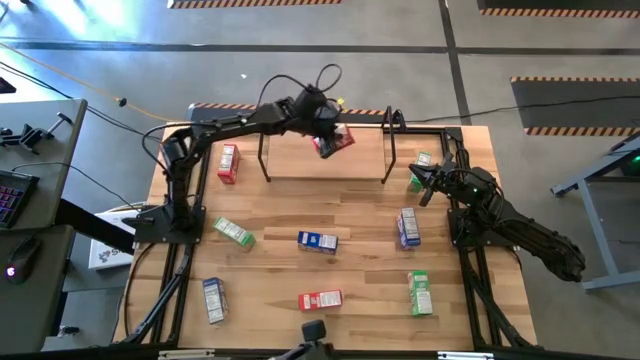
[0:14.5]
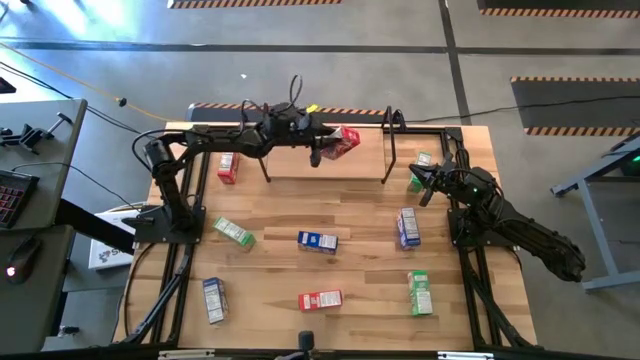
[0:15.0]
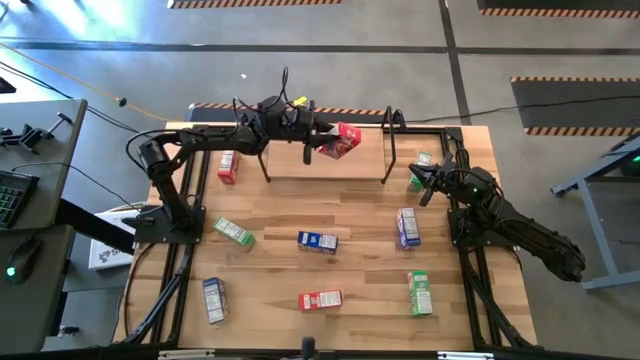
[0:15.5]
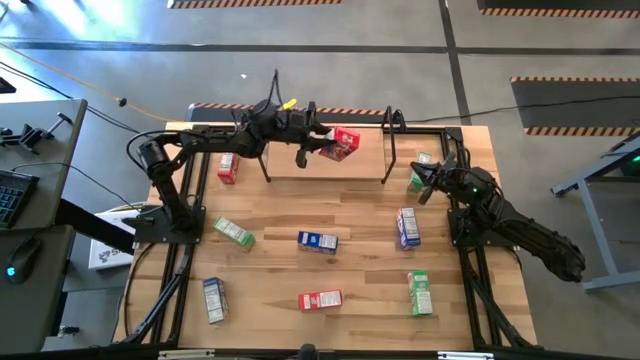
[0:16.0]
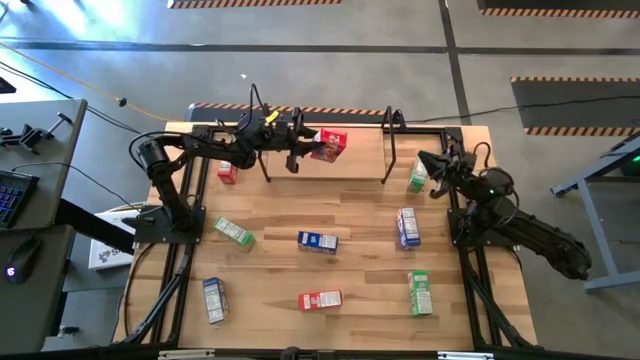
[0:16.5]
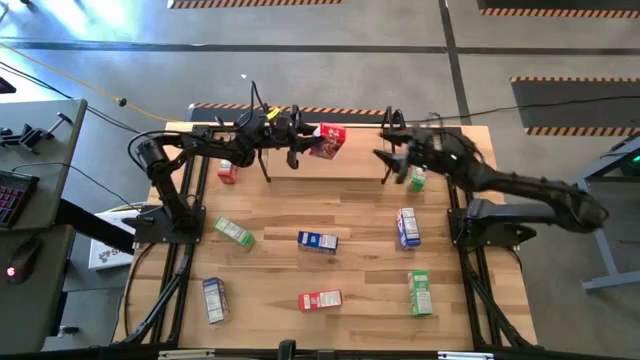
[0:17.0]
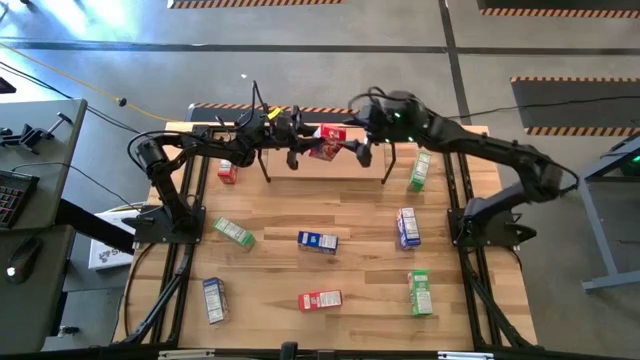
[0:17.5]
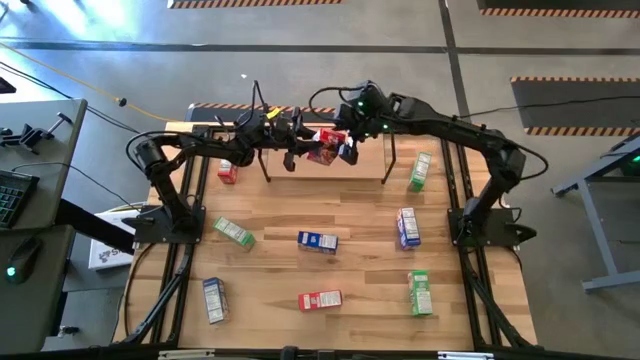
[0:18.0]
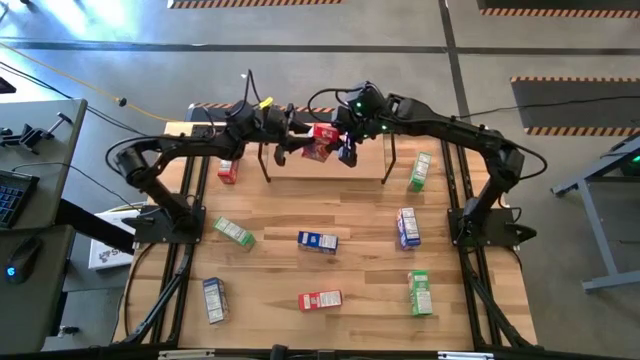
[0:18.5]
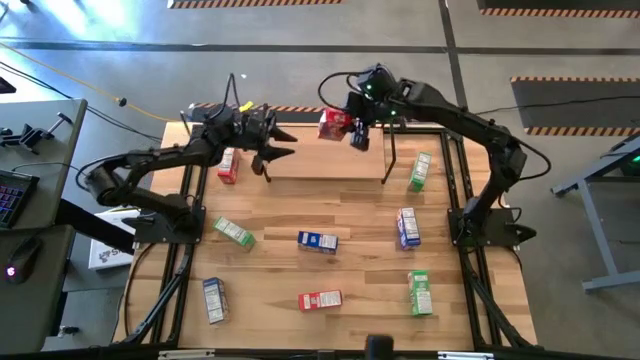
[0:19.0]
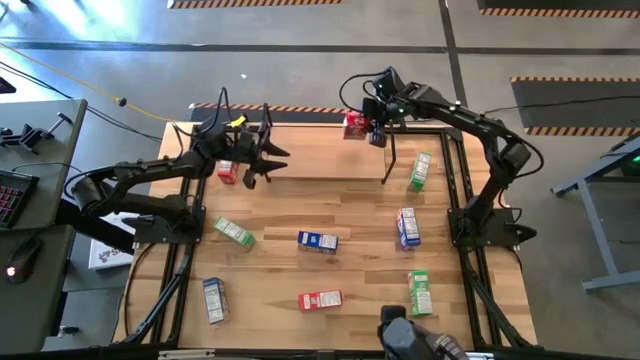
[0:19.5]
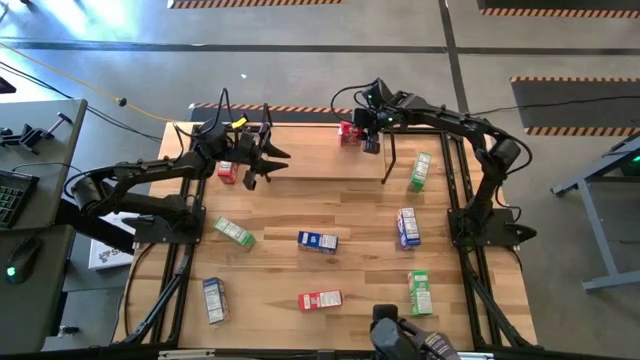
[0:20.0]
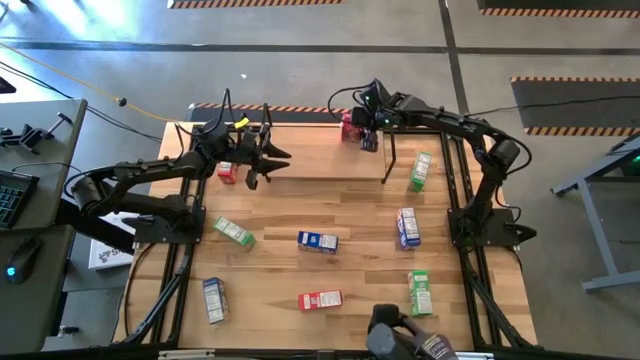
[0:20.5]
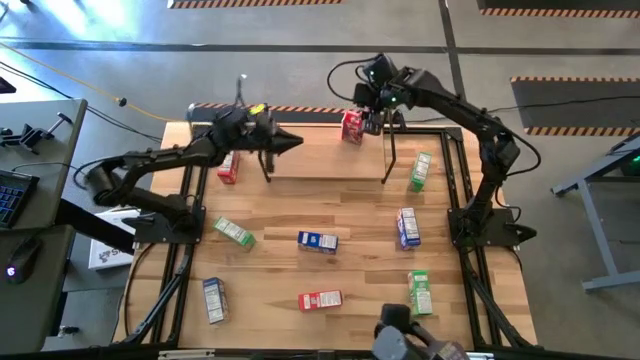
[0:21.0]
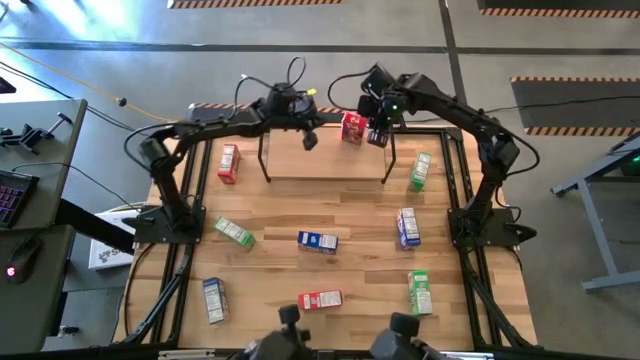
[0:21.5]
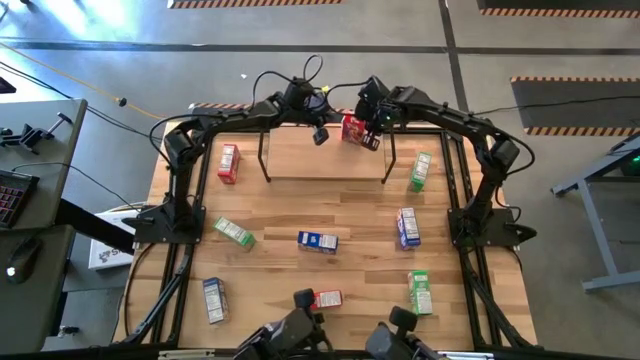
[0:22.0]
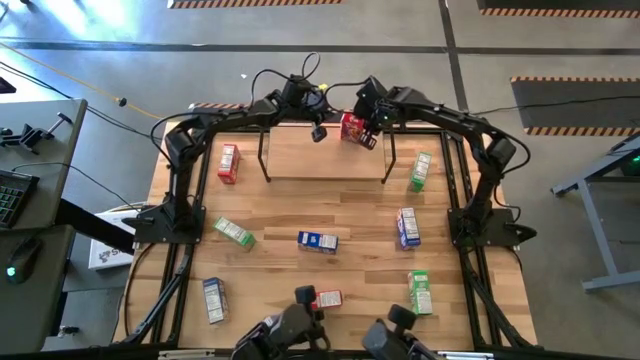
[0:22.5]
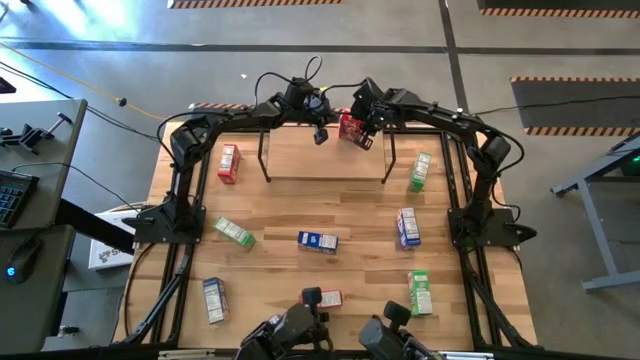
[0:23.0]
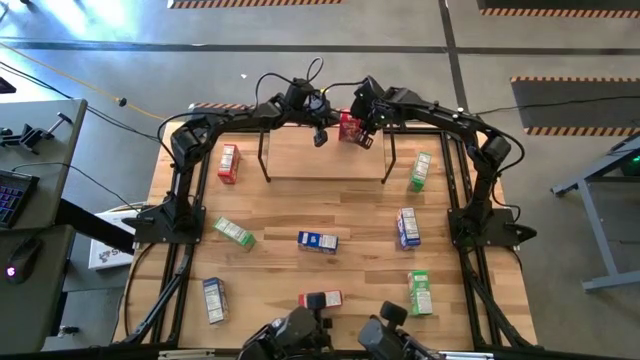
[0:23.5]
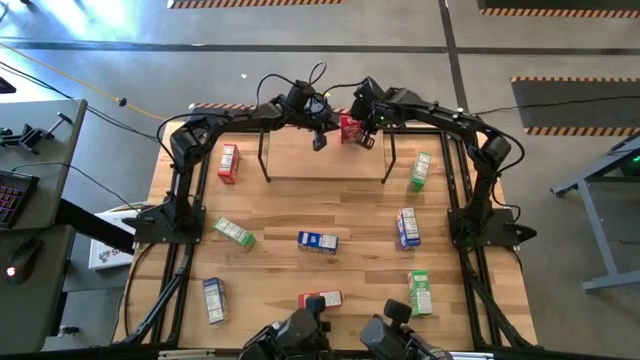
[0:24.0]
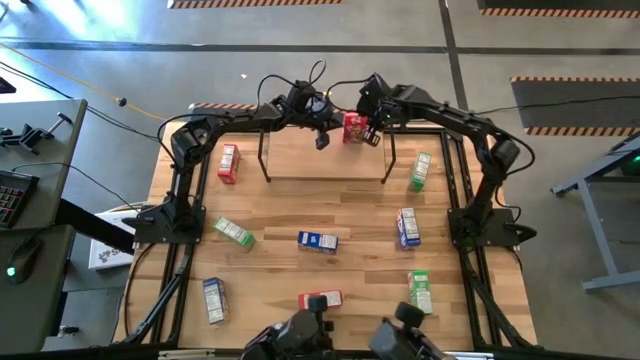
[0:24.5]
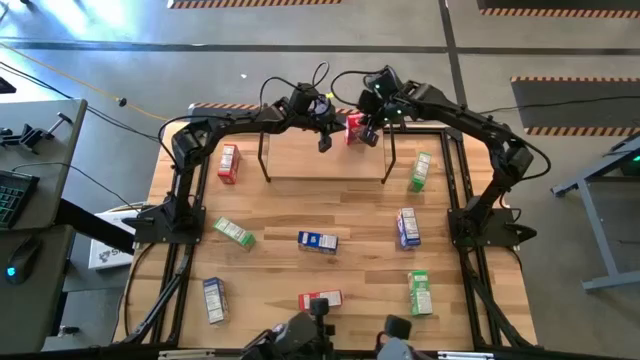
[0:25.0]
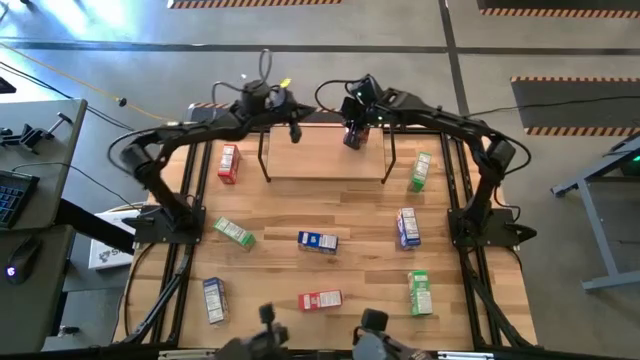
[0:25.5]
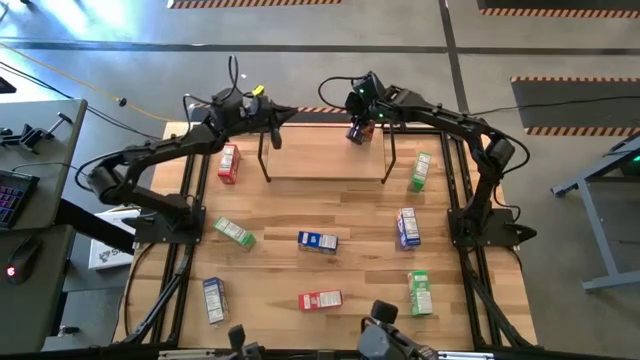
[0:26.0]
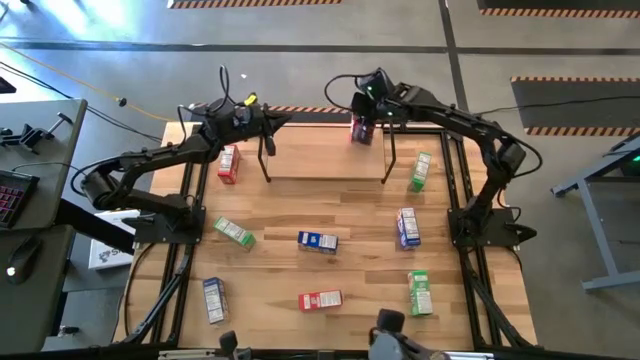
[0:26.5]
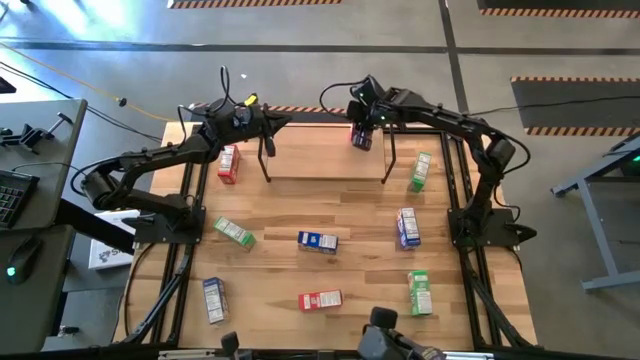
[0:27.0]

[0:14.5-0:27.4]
Task: Stack cereal on shelf
Put the middle red cereal box on the shelf

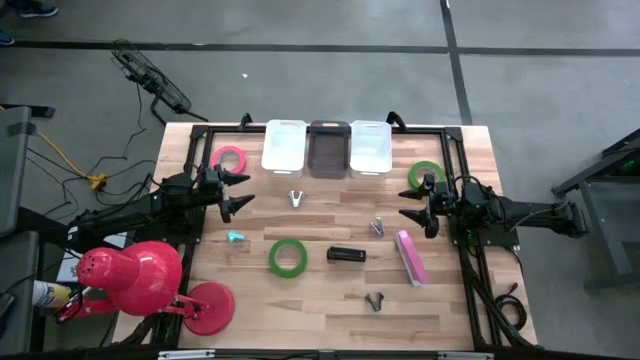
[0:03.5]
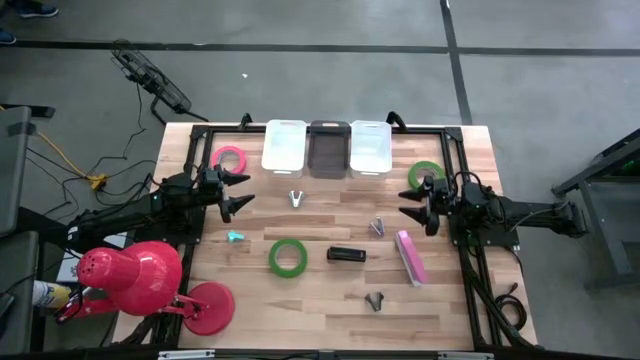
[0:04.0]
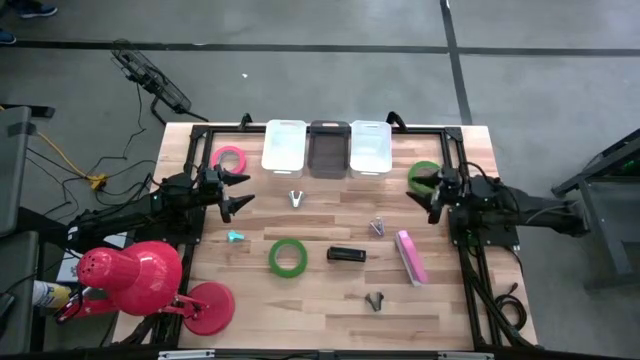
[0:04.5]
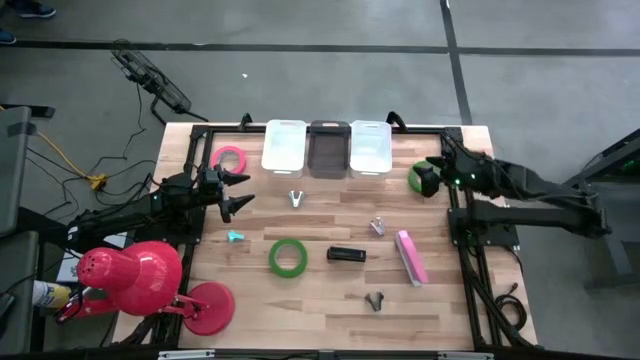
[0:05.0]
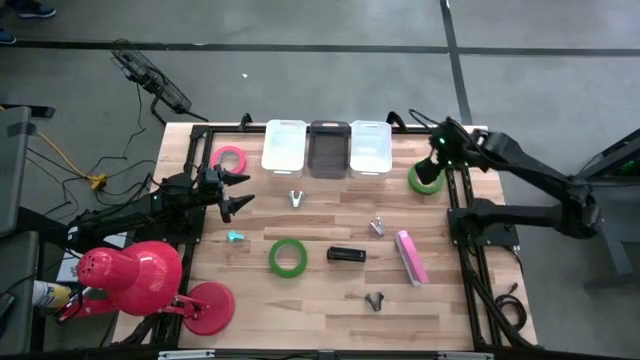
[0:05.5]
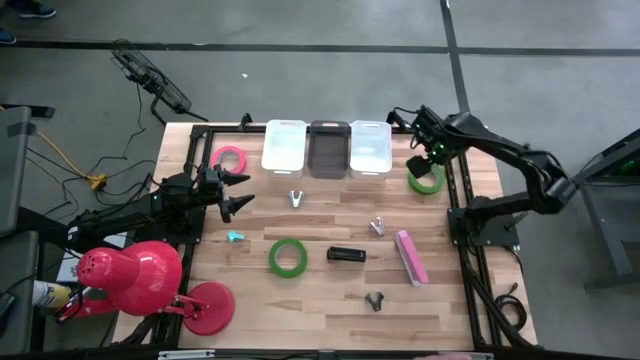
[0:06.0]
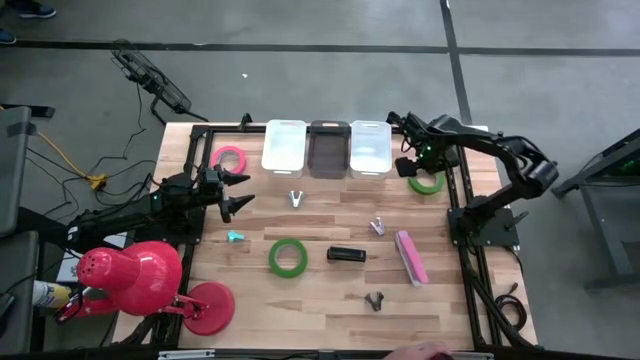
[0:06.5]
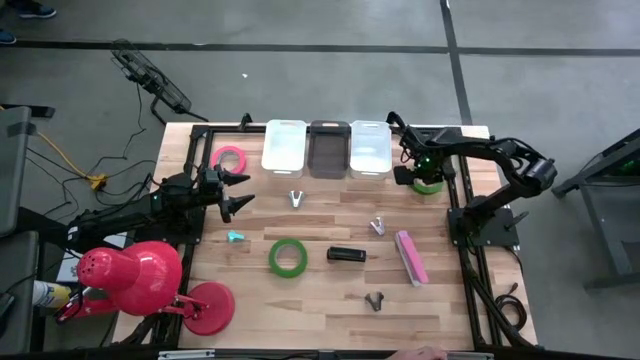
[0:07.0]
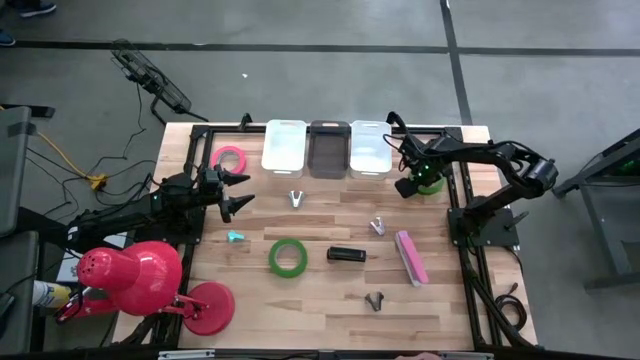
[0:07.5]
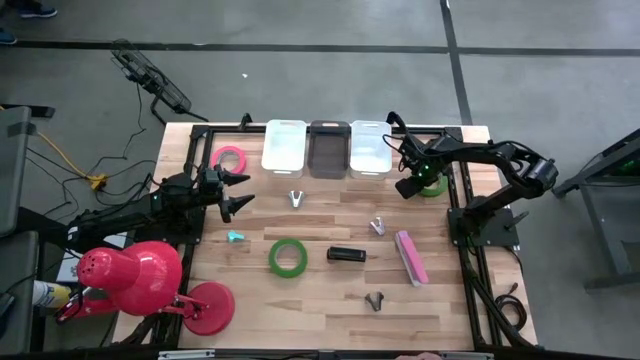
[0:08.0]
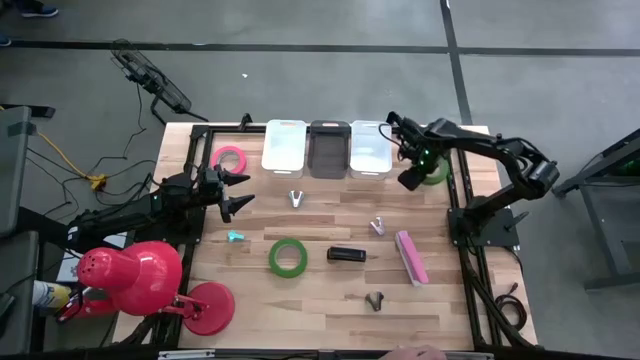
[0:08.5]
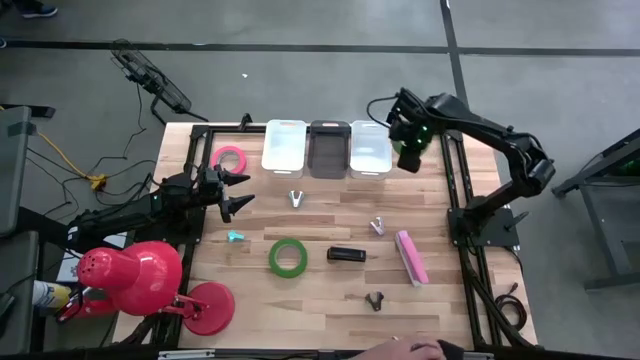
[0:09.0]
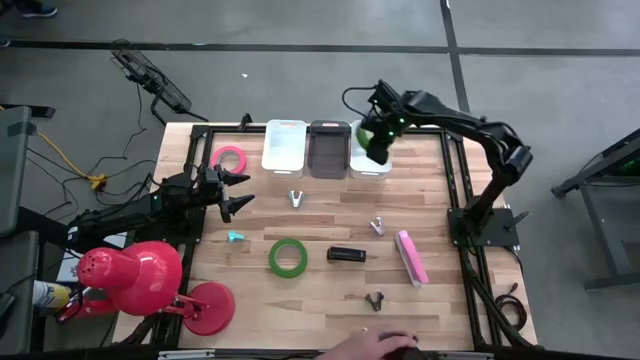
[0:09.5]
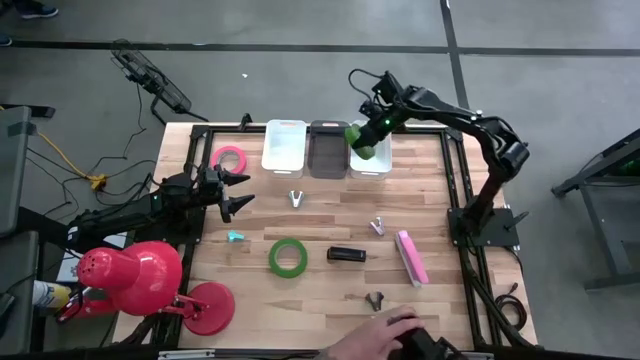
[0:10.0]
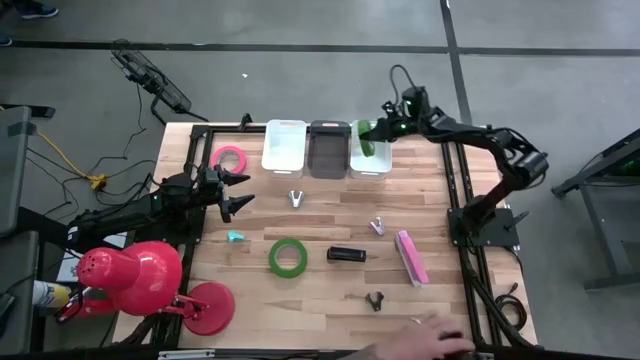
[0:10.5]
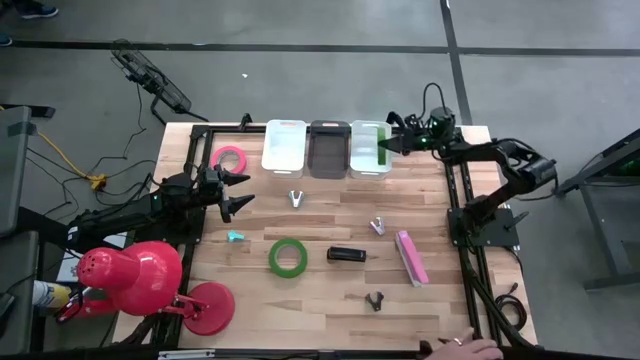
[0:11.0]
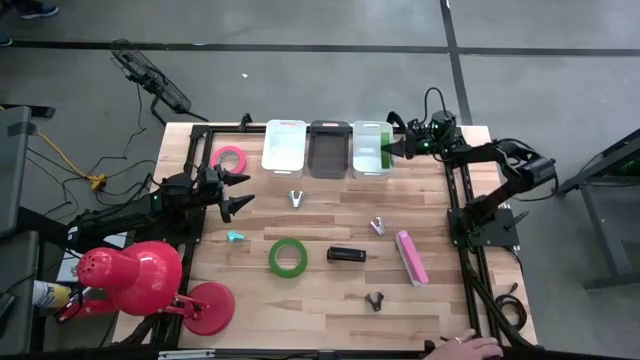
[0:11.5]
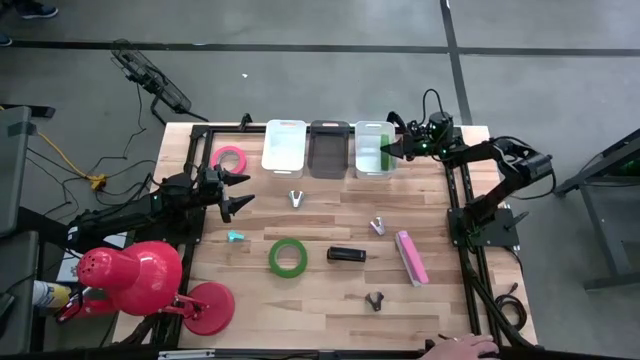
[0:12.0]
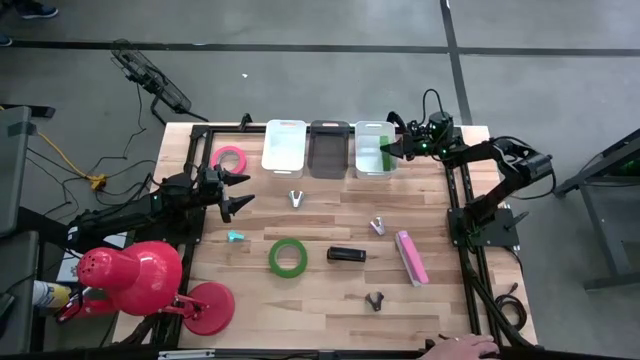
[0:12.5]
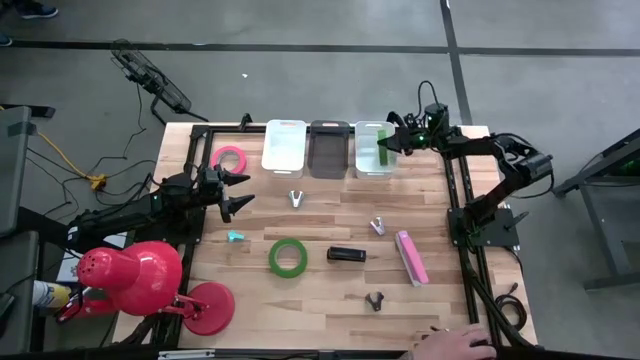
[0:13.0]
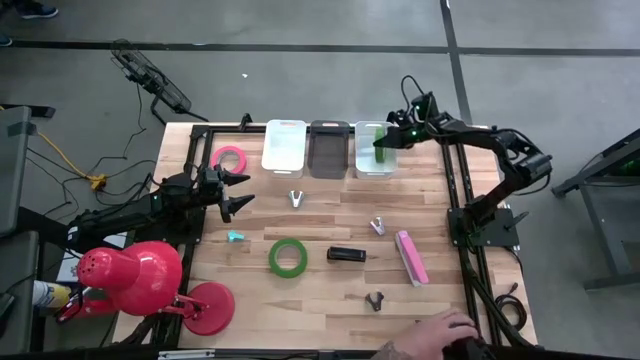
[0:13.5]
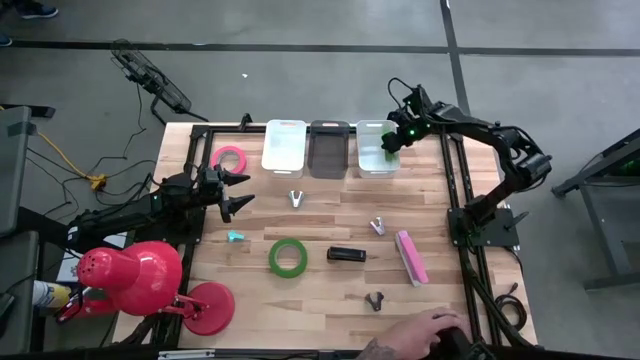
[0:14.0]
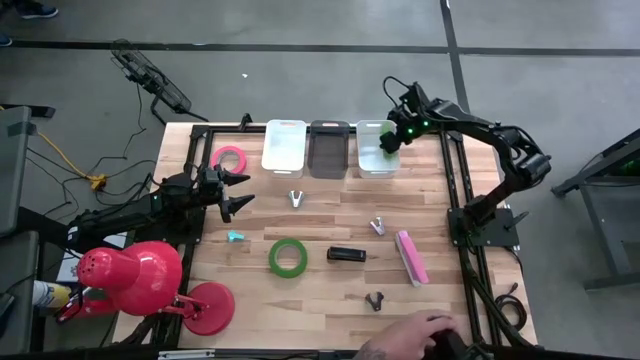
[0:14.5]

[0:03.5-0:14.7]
Task: Pick and place Stapler, Stapler remover, tape
Put the top green tape into the right white bin
